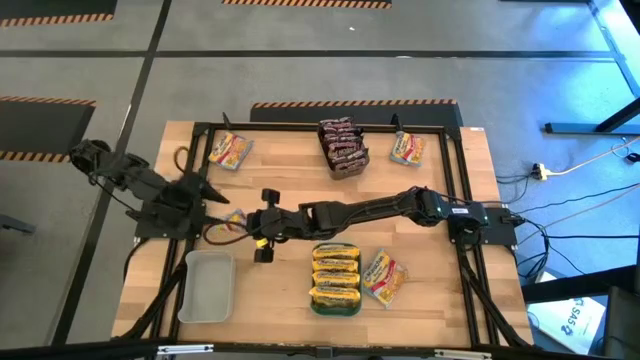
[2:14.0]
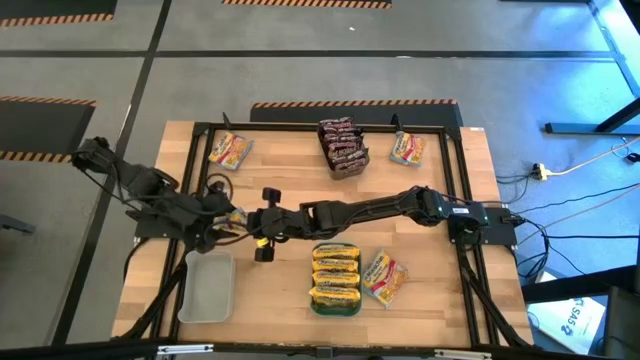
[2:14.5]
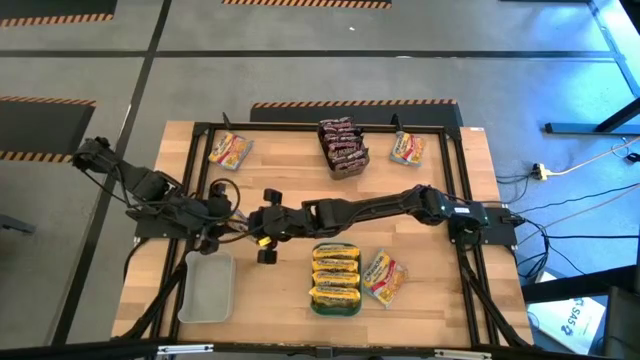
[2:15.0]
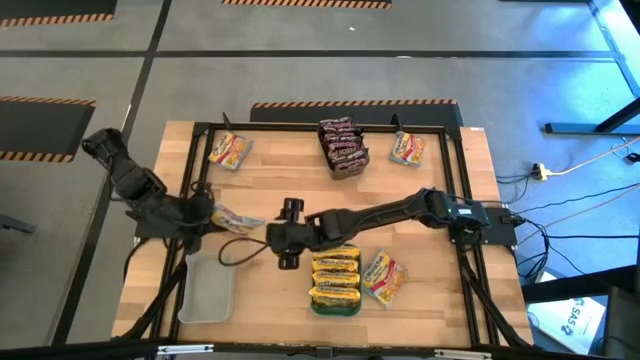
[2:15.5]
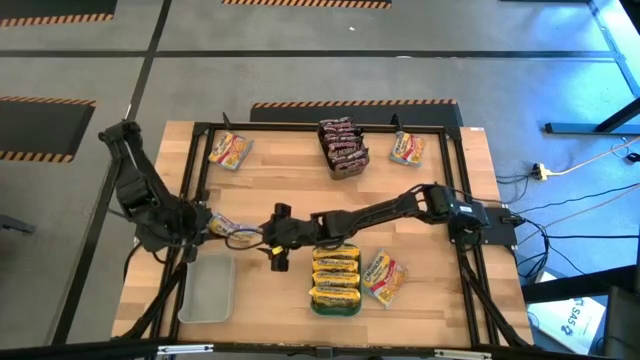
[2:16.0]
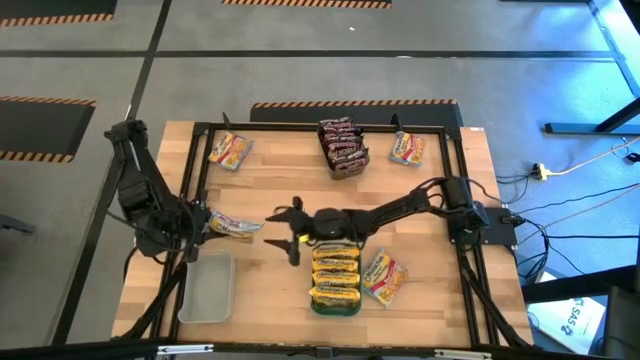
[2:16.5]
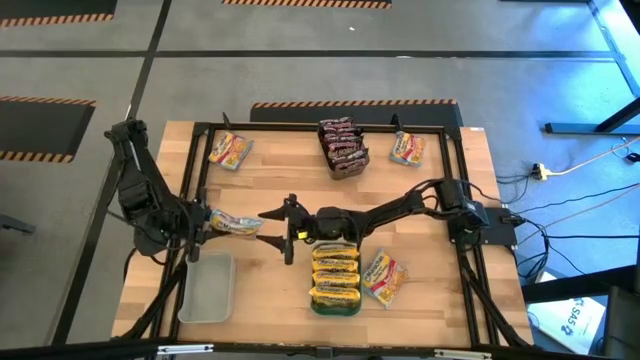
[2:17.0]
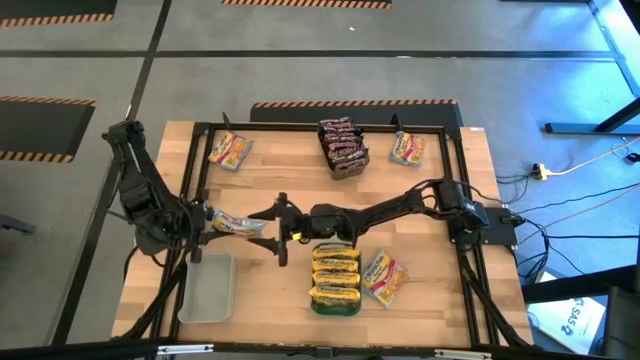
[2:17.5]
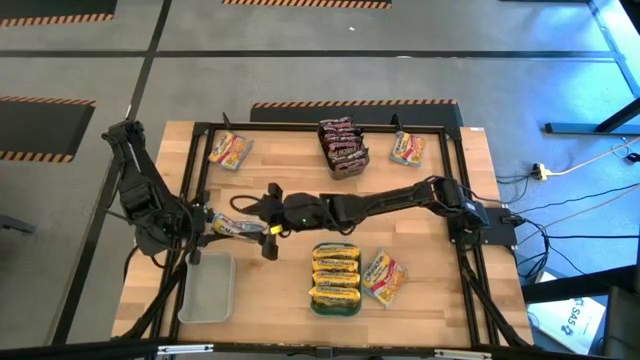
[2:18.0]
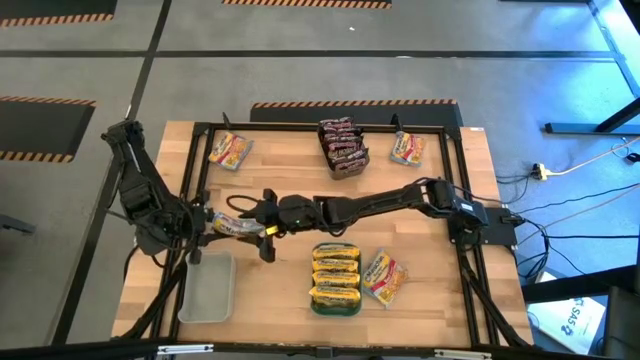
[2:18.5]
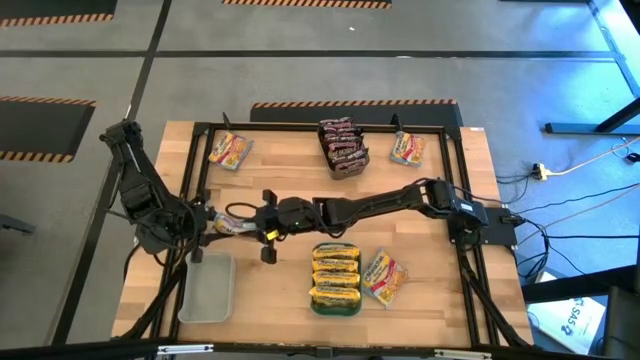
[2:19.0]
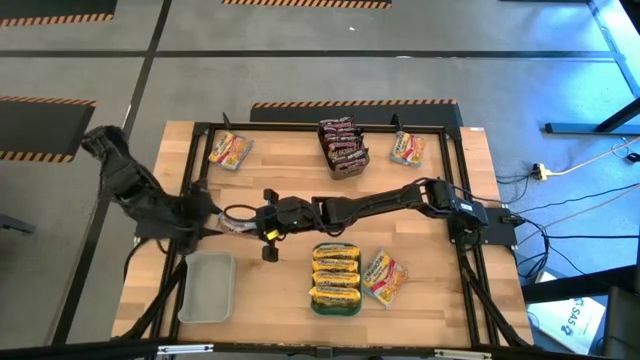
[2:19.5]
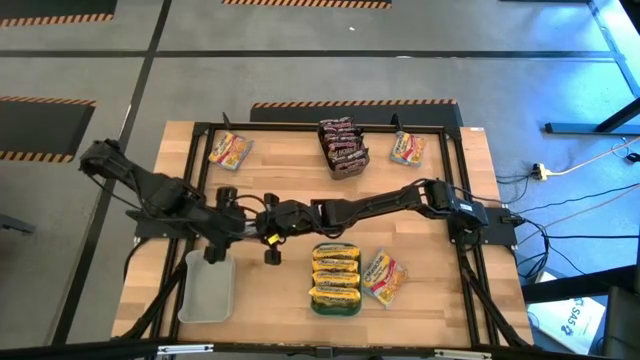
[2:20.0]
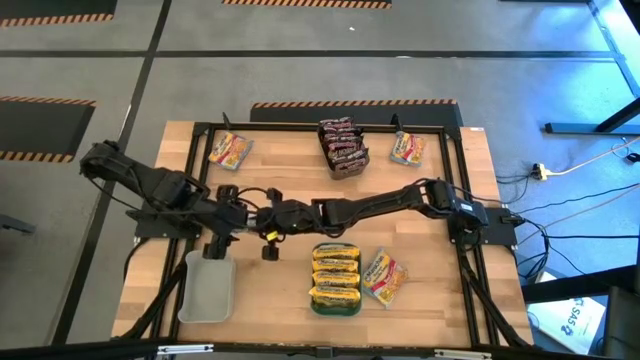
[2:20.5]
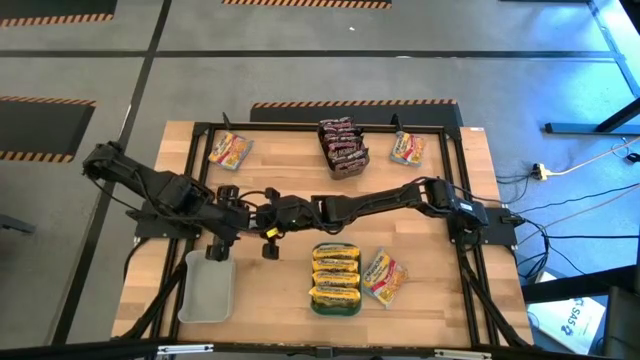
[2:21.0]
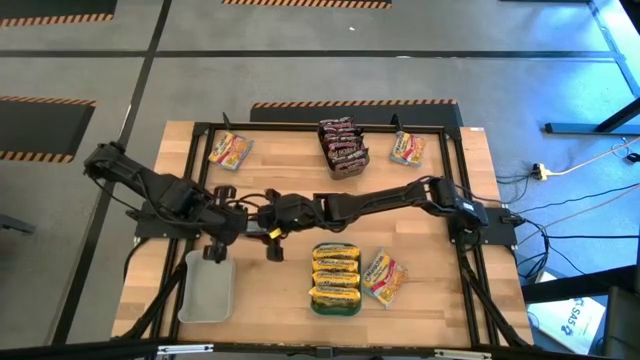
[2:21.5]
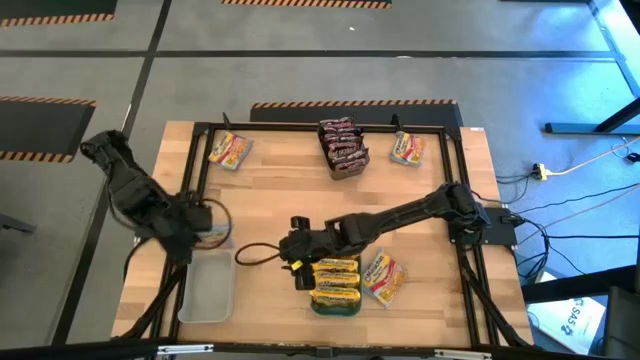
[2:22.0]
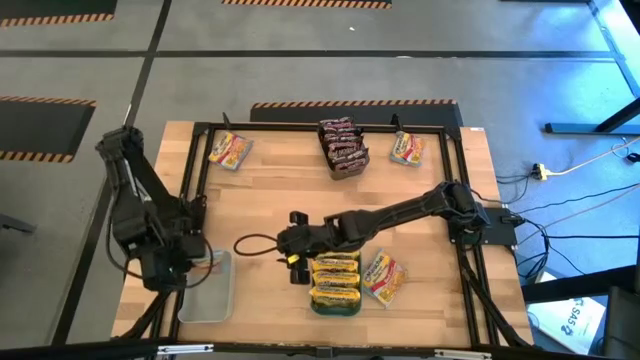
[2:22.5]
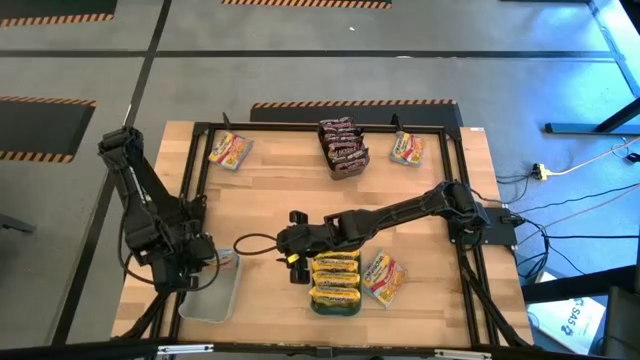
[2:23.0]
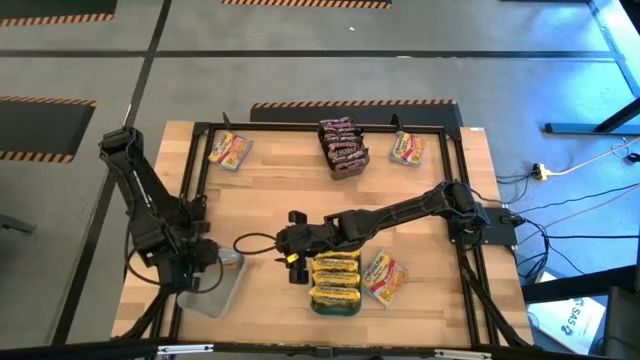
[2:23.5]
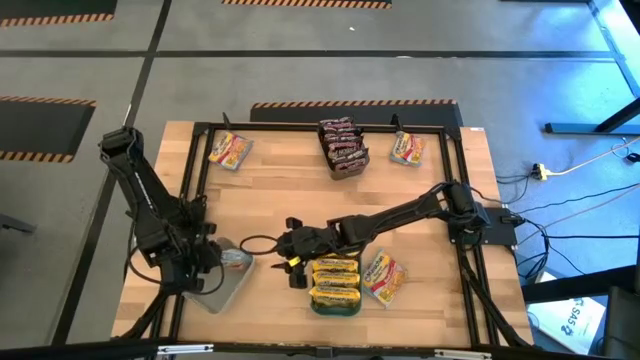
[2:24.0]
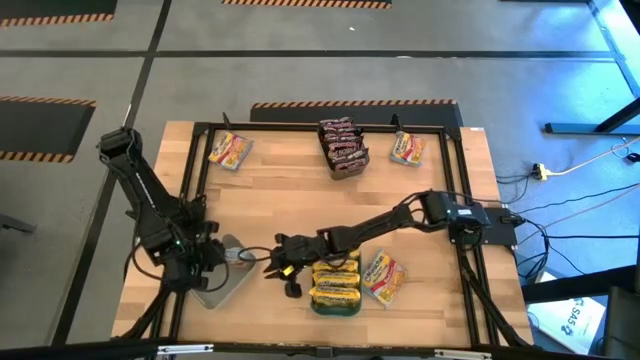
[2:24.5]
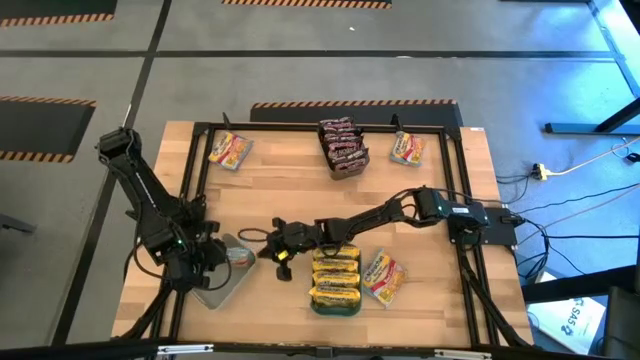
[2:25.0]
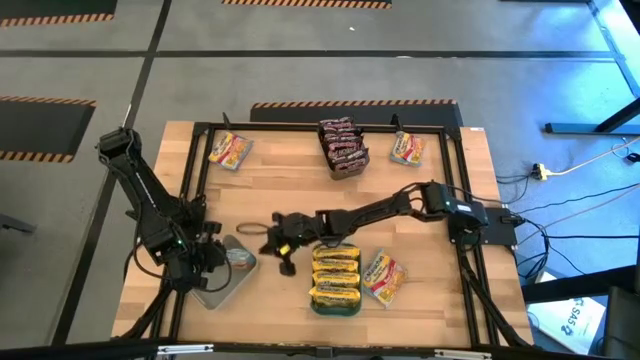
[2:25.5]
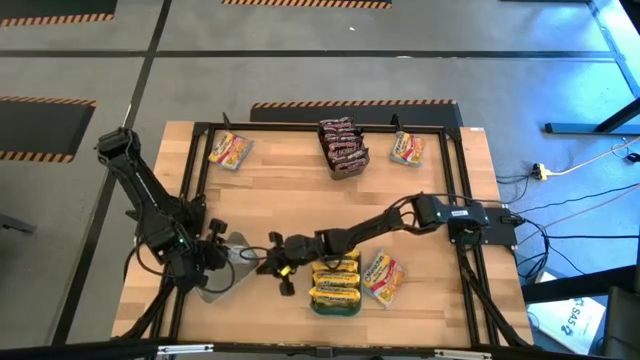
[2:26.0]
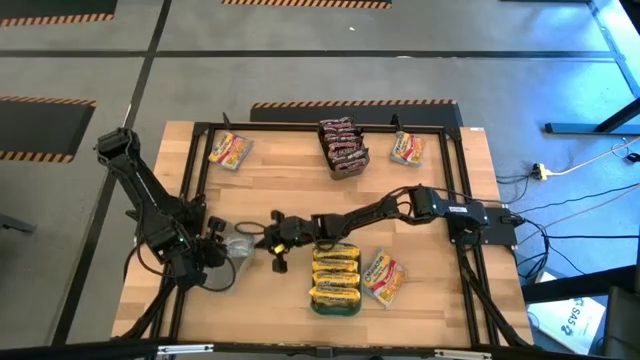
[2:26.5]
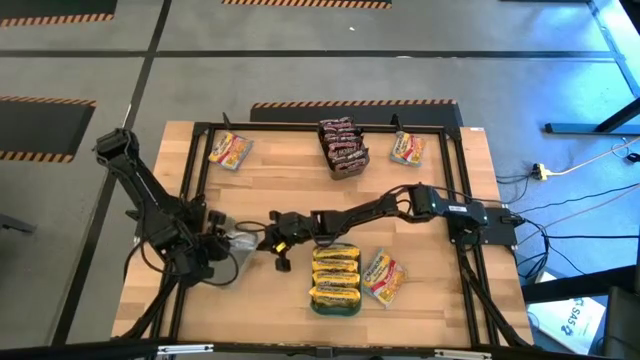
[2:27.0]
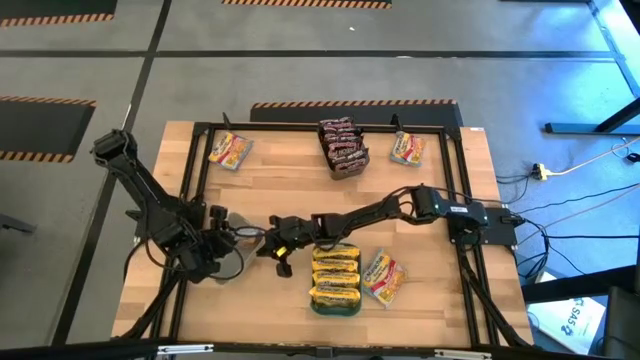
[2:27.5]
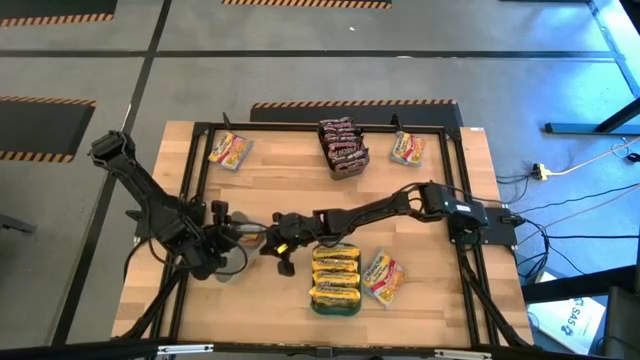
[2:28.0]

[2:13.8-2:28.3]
Task: Sort Maruchan noodles
Put the blue noodle pack into the white bin

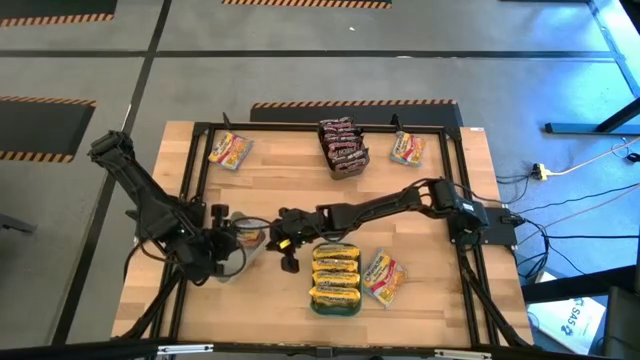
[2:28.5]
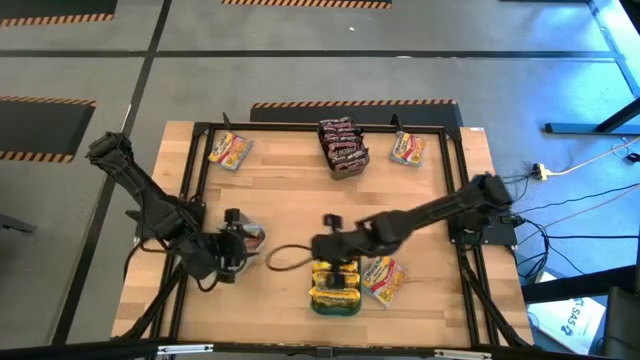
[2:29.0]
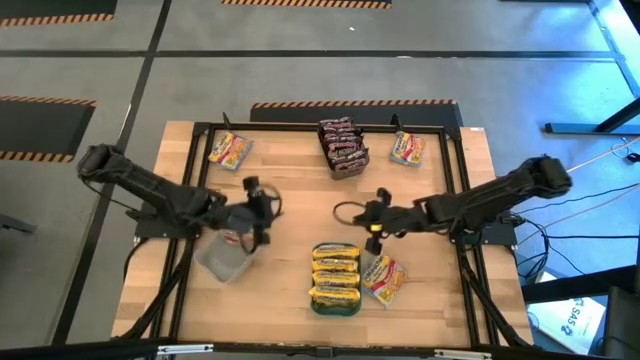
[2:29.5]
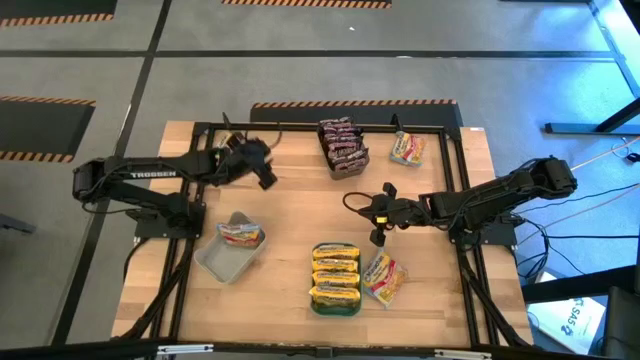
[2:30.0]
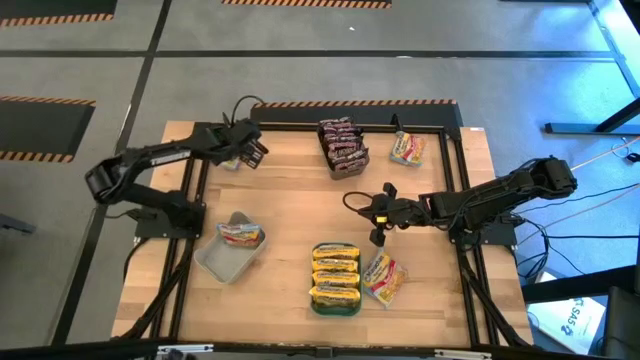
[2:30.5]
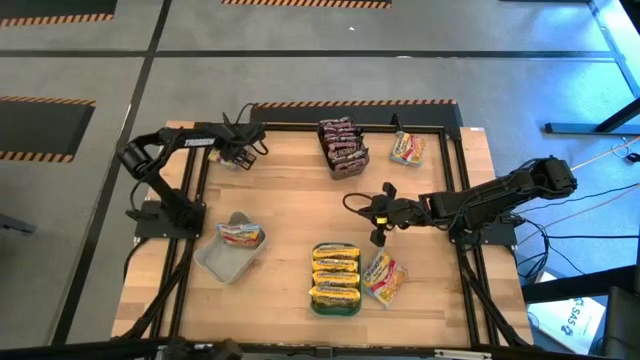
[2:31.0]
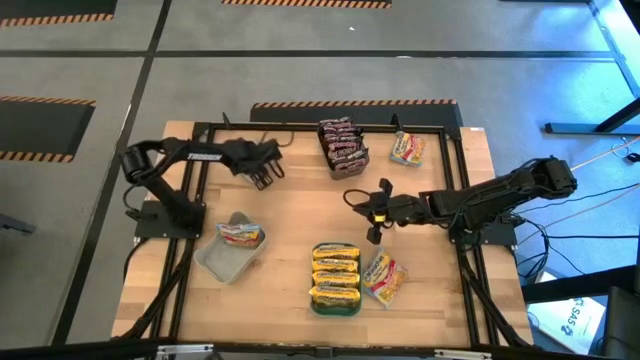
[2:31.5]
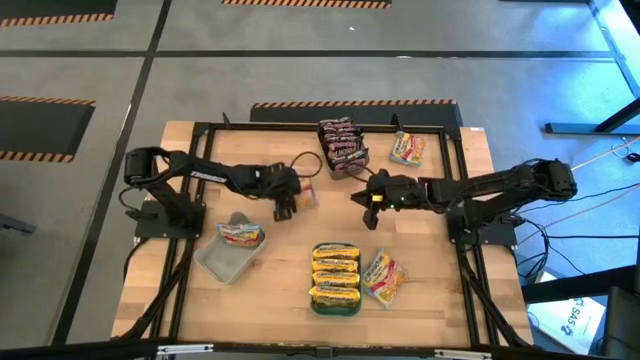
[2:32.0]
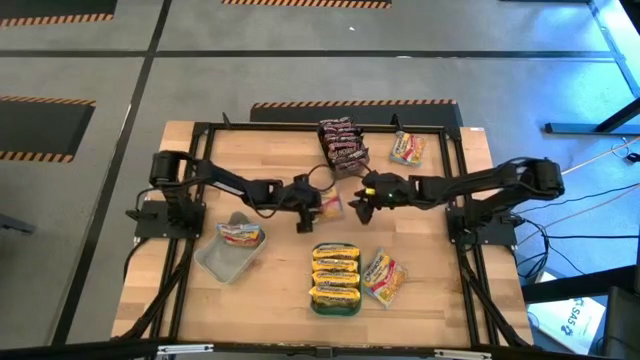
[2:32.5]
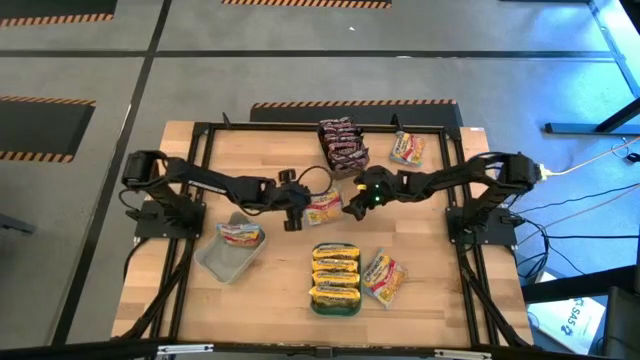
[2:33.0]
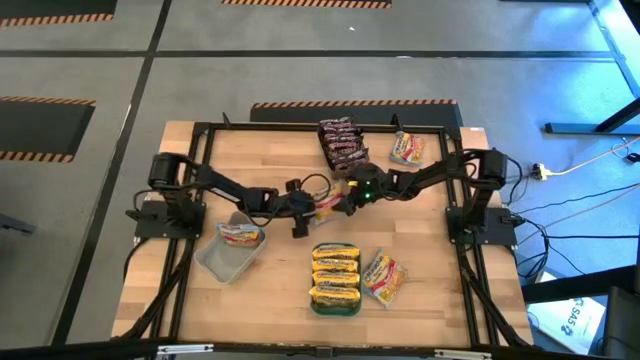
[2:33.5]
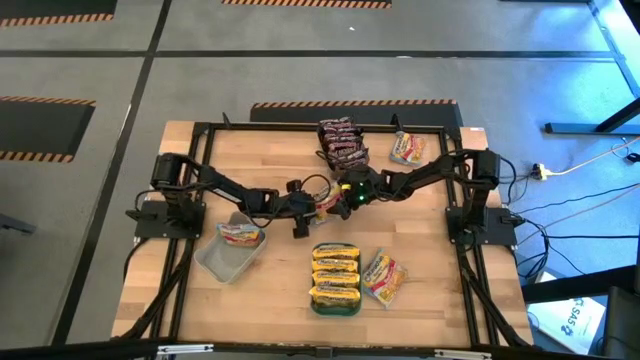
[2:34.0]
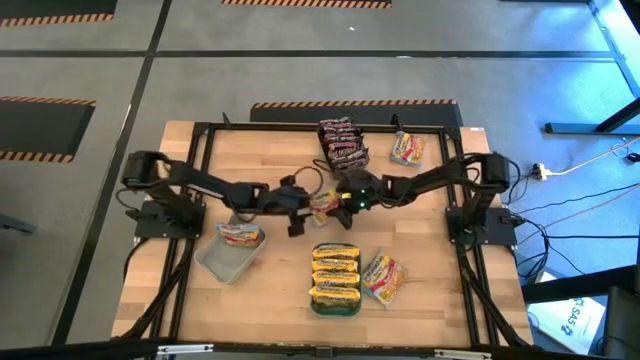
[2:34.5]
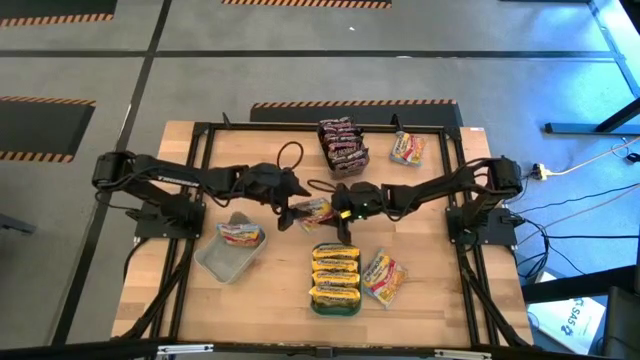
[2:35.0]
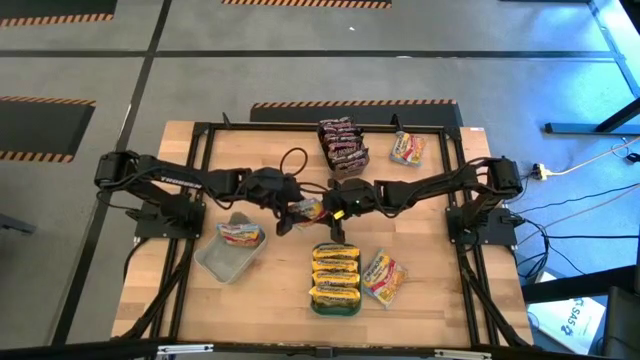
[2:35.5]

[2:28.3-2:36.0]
Put the blue noodle pack into the white bin
